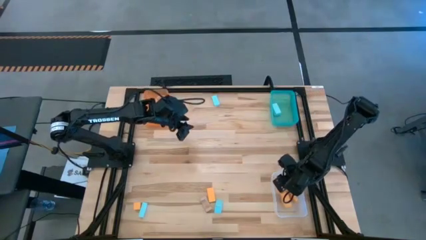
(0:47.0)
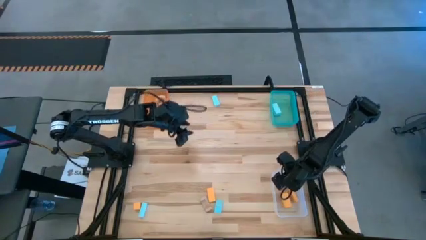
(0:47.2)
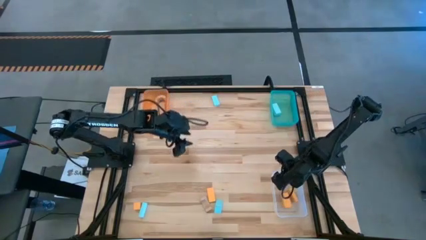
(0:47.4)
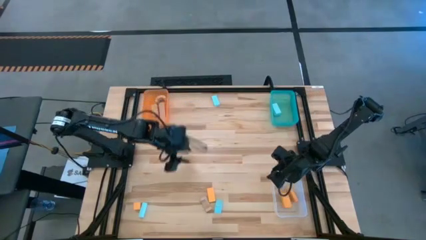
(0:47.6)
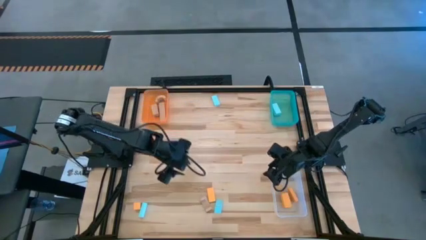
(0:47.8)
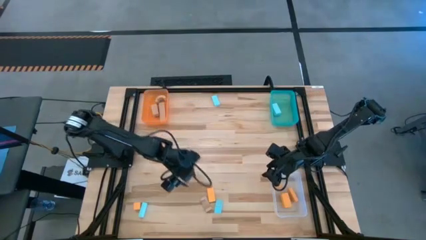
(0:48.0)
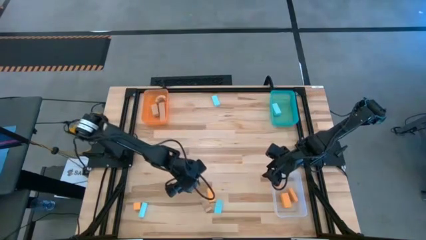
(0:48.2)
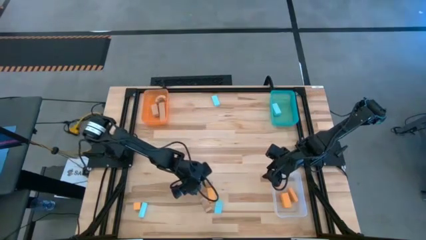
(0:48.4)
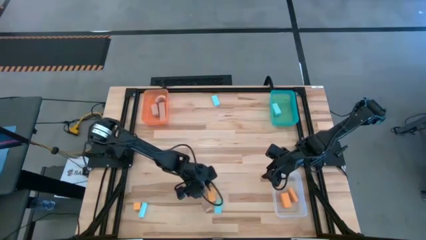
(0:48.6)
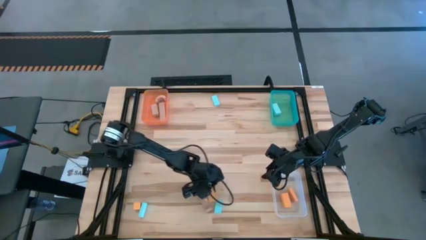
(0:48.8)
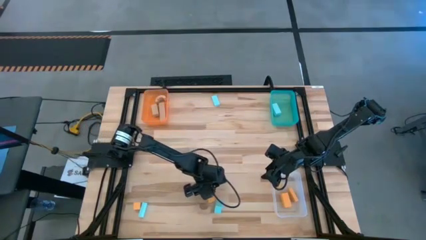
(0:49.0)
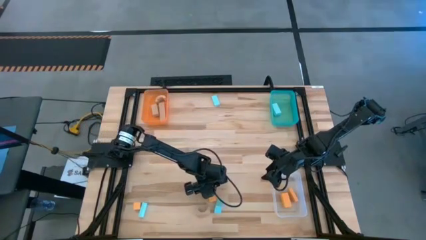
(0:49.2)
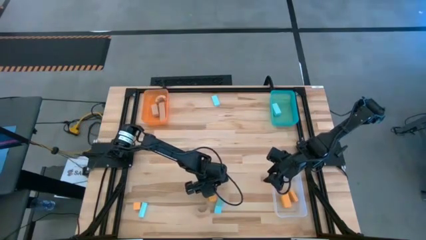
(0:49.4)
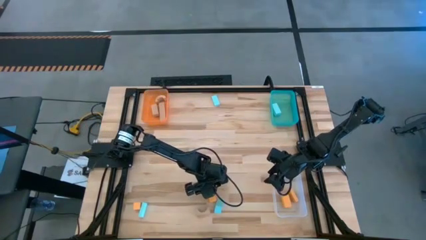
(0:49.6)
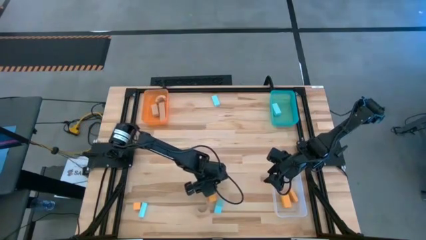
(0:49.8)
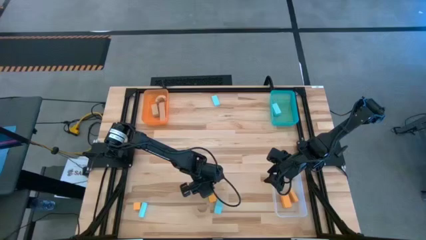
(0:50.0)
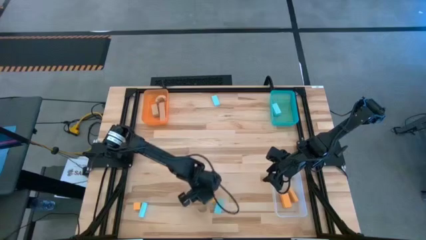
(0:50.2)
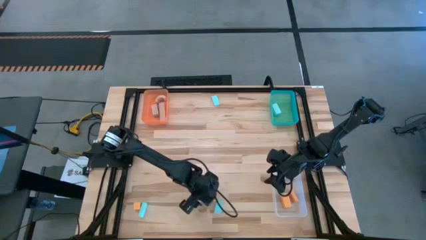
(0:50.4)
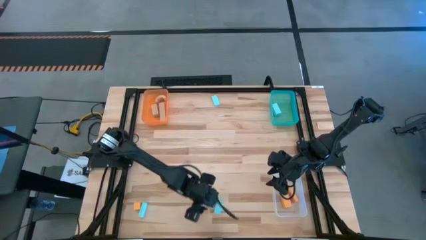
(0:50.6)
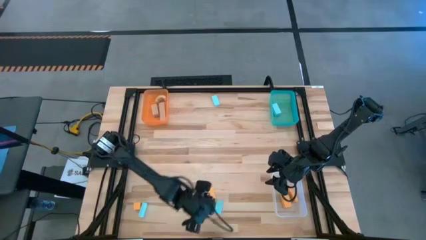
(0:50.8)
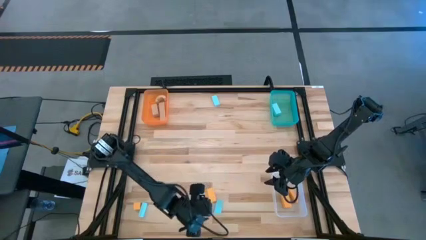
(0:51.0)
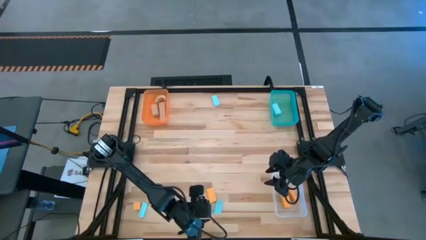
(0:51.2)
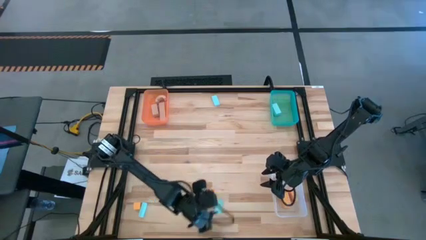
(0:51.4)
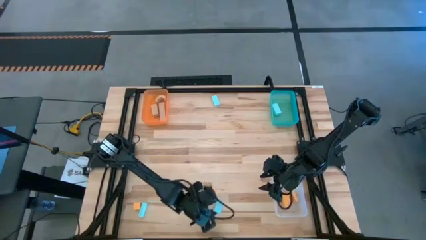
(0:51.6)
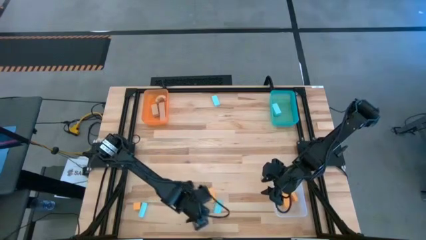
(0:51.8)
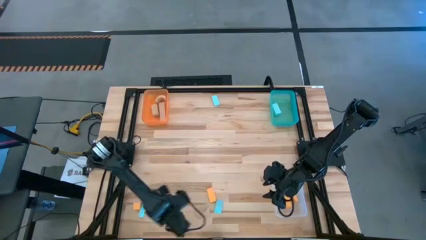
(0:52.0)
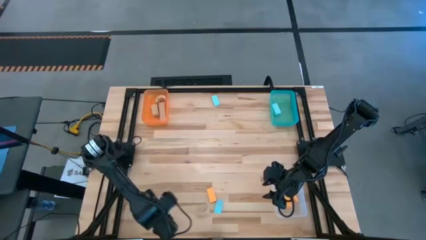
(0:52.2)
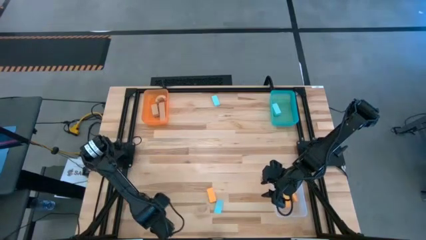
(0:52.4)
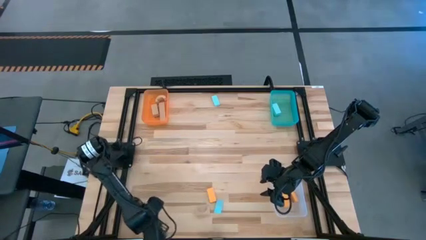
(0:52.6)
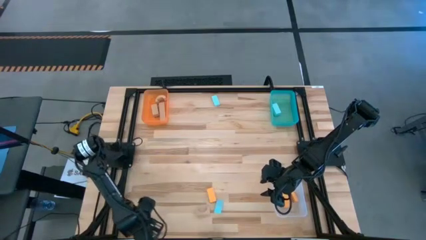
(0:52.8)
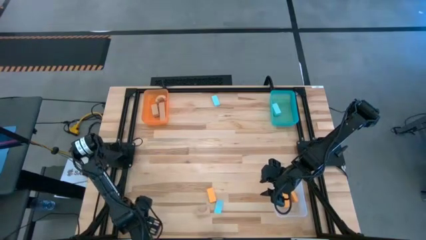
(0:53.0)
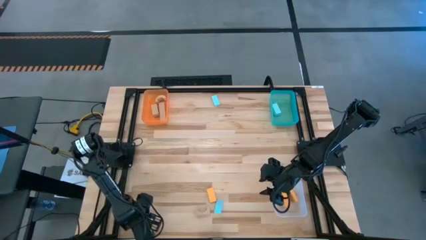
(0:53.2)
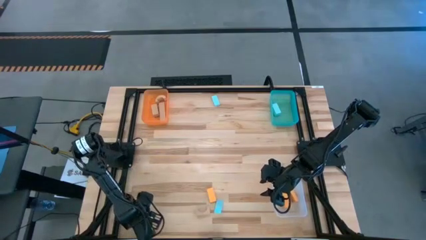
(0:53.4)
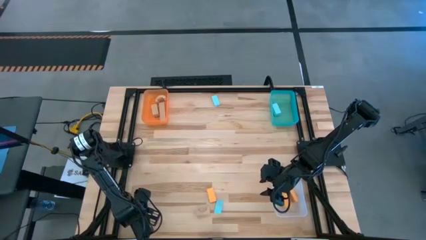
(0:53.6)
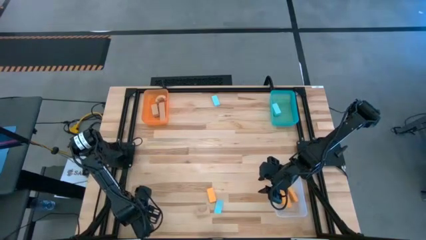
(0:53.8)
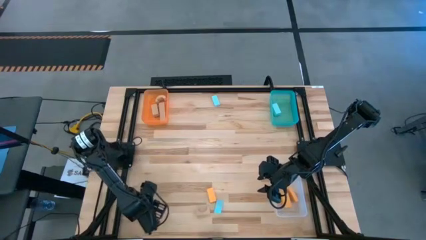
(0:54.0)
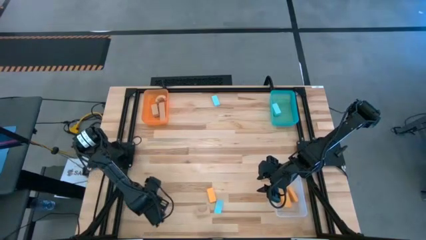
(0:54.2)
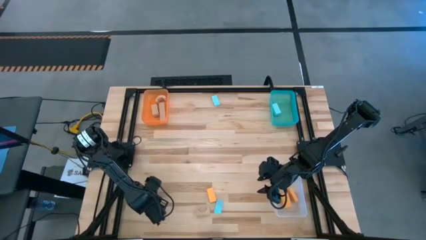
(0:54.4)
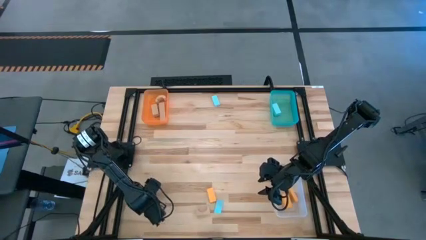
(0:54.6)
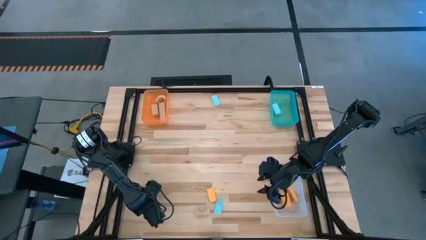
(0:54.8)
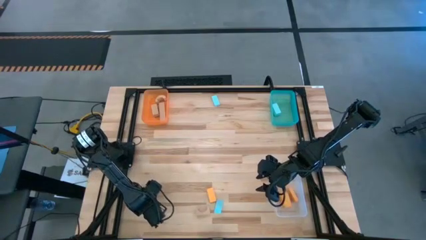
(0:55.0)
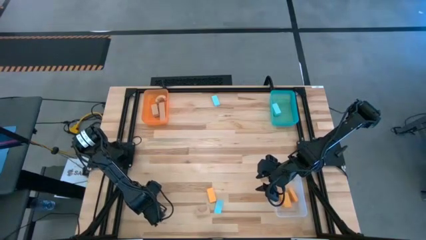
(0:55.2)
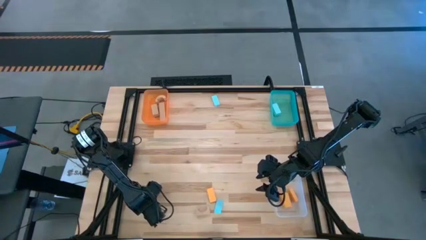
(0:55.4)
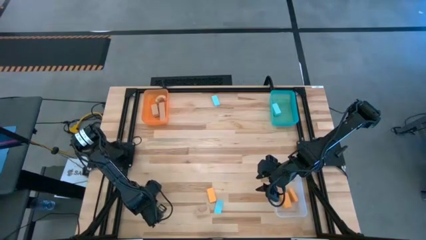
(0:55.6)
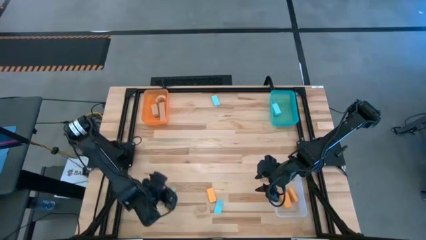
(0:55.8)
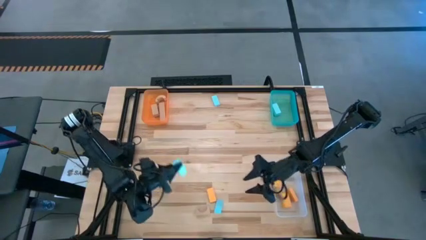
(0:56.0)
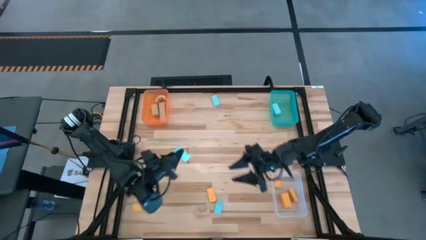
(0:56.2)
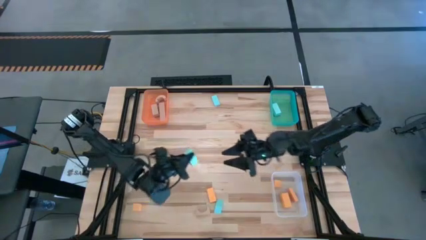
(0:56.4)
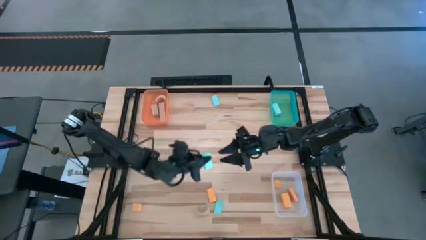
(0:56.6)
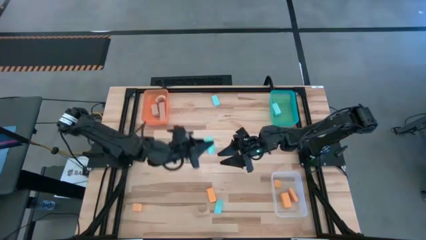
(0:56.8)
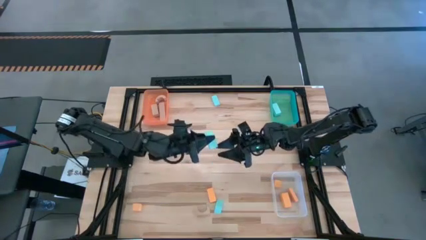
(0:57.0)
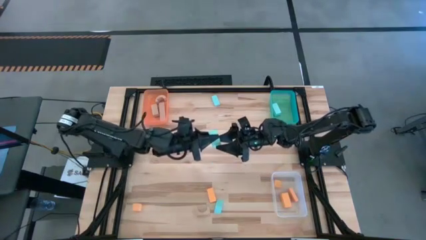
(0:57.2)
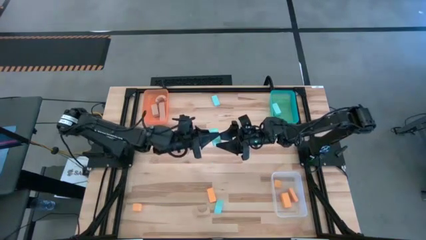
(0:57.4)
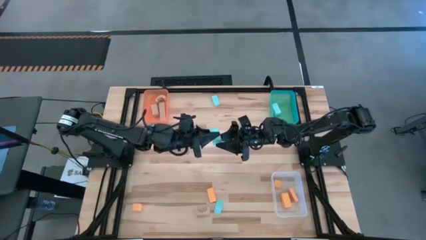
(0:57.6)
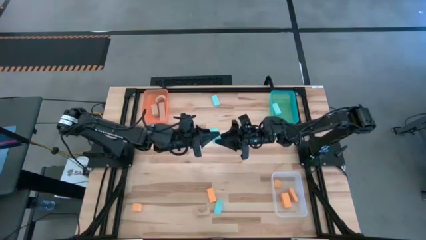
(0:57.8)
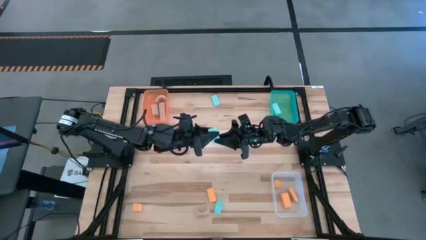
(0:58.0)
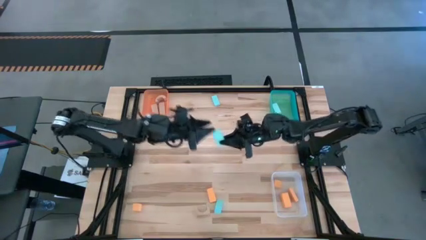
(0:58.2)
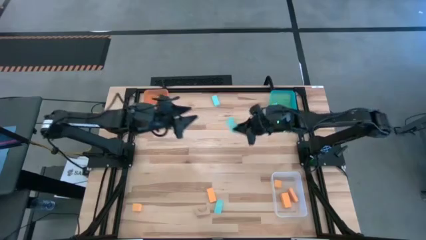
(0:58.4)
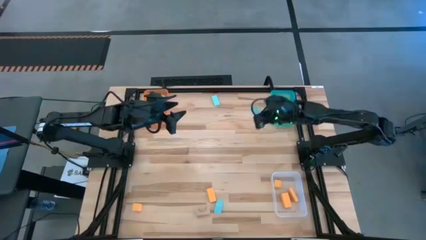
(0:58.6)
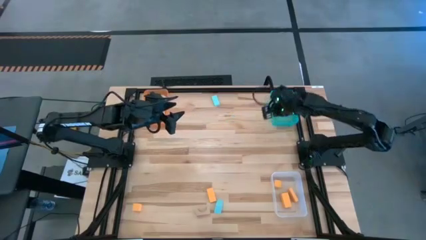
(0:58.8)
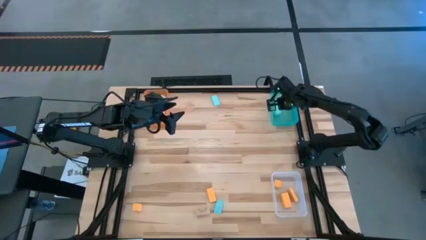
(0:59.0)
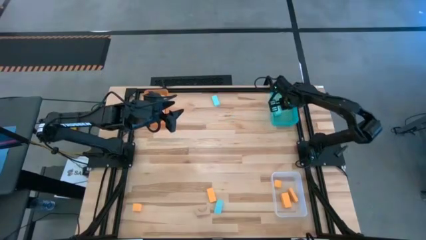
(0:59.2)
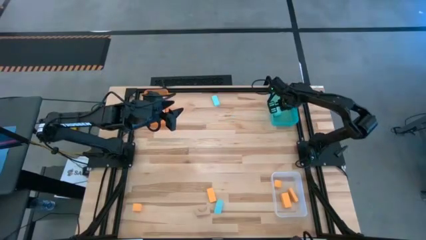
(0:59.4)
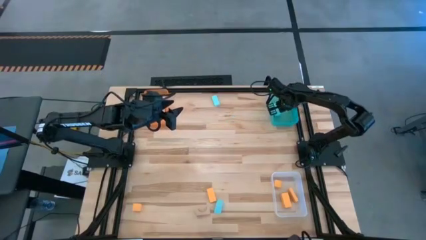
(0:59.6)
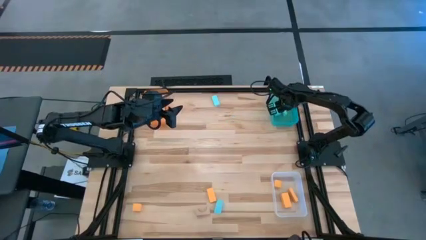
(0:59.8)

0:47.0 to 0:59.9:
Task: Sort & place blocks by color
Put the blue block into the blue bin

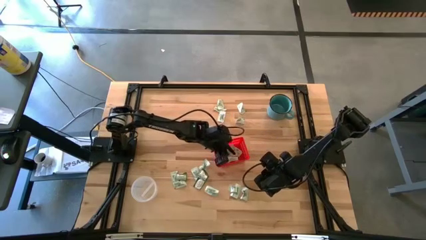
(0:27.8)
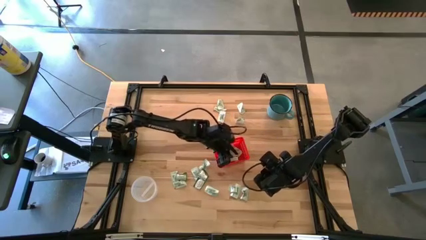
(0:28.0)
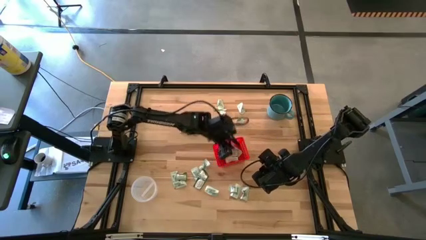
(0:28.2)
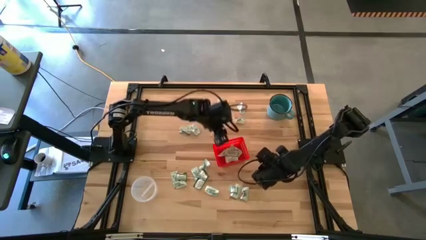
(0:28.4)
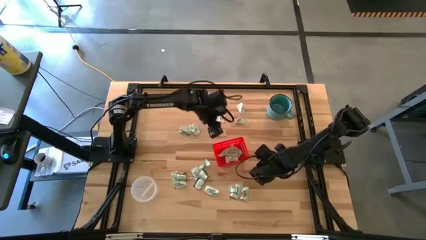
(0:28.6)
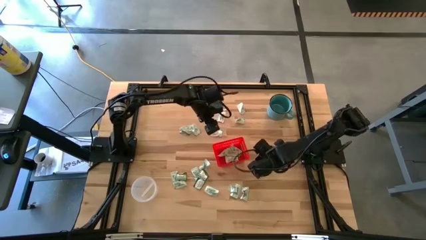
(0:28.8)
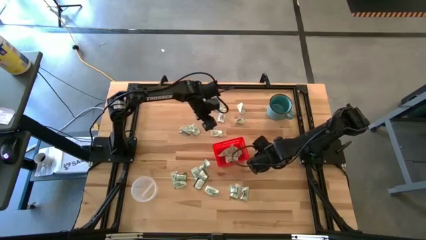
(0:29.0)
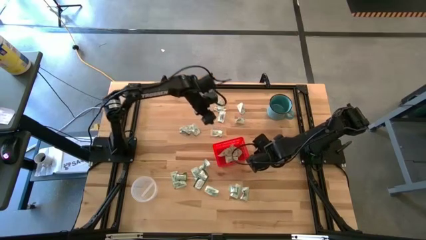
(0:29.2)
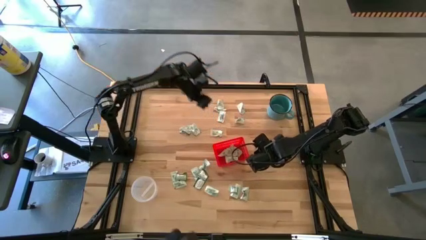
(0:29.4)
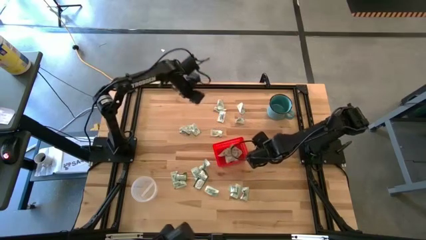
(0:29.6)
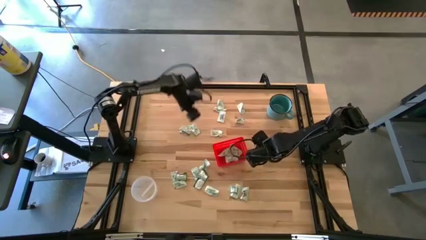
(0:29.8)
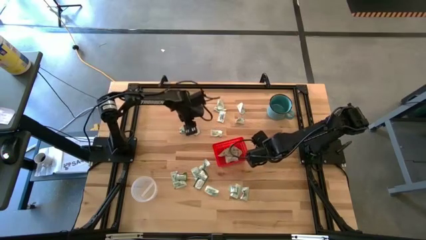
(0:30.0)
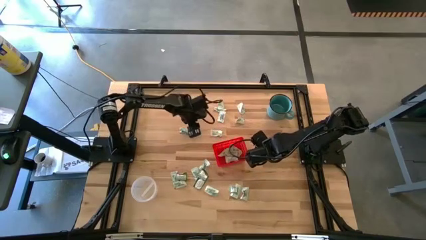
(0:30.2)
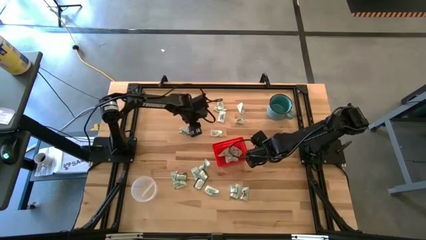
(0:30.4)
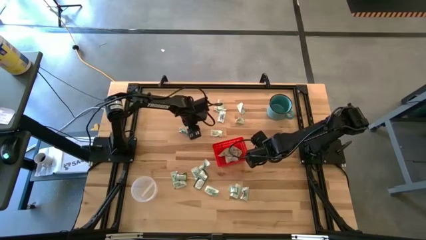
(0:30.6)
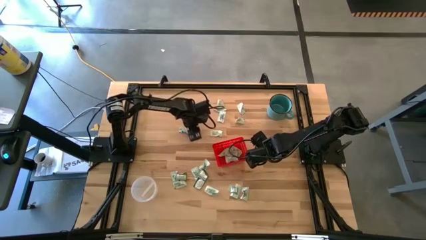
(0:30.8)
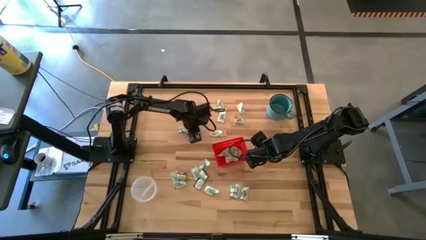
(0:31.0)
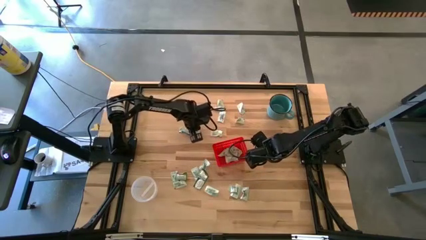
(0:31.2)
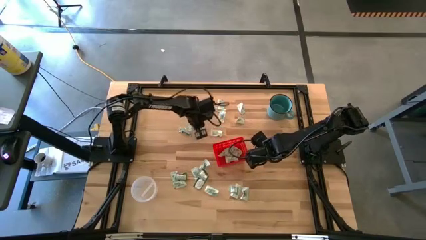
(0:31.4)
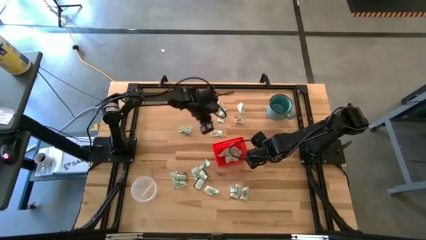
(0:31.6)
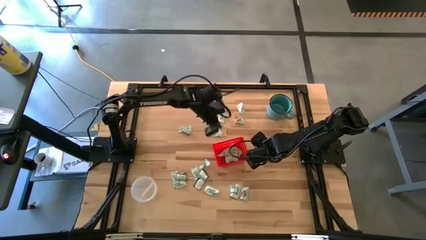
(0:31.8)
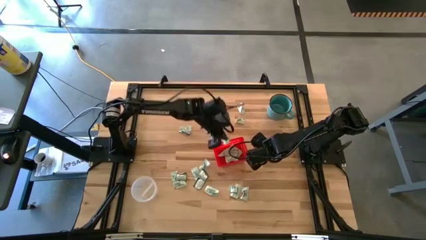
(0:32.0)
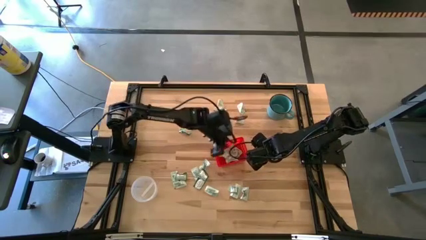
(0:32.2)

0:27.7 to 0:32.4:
Task: Pick and place items into bin
Put the white stevia pack into the red bin
